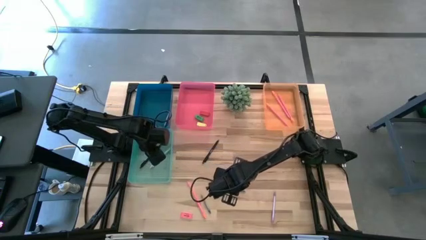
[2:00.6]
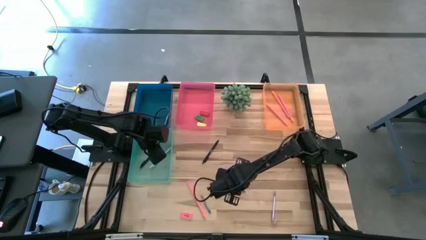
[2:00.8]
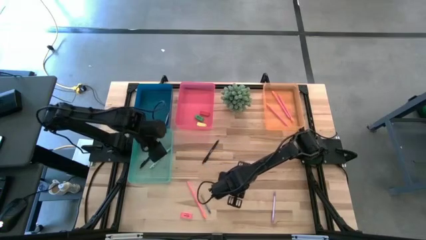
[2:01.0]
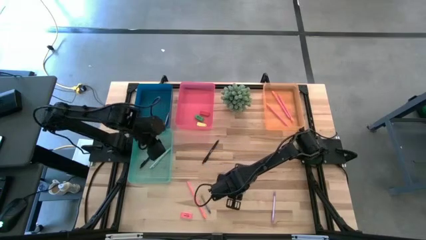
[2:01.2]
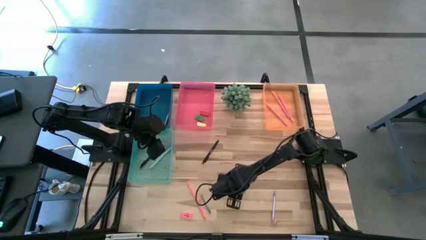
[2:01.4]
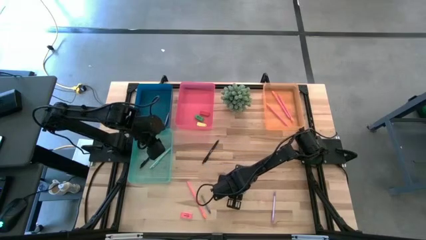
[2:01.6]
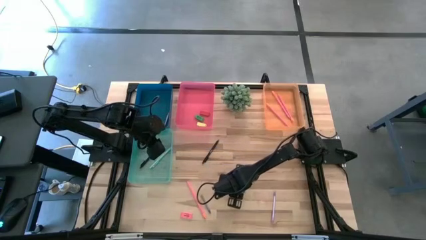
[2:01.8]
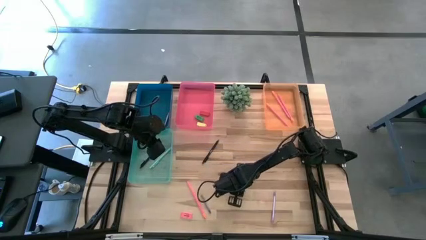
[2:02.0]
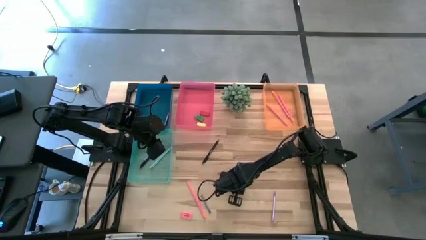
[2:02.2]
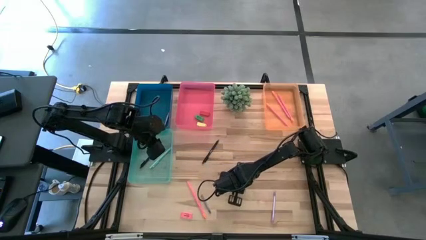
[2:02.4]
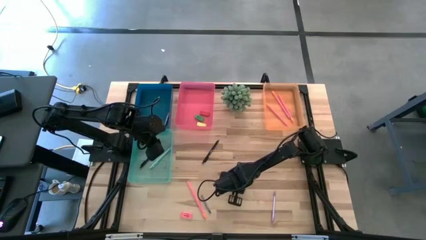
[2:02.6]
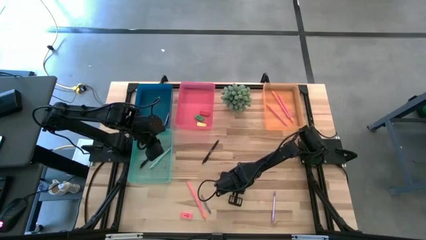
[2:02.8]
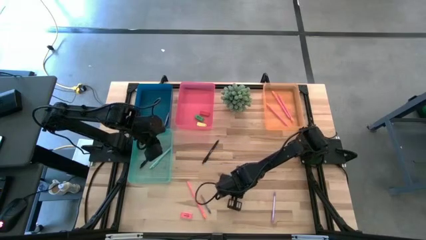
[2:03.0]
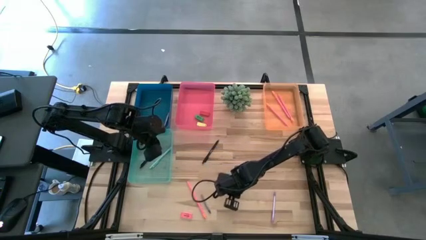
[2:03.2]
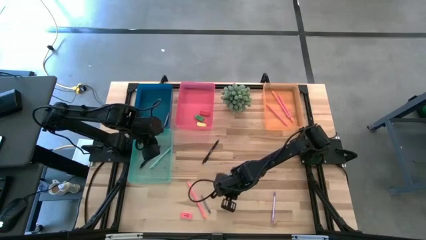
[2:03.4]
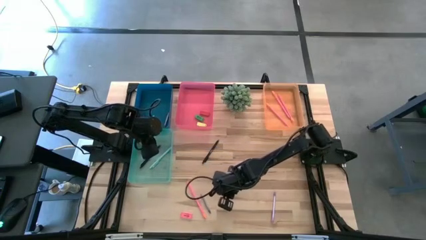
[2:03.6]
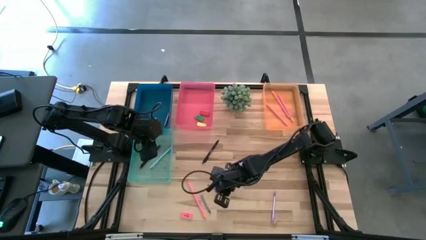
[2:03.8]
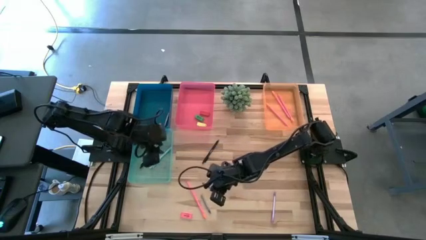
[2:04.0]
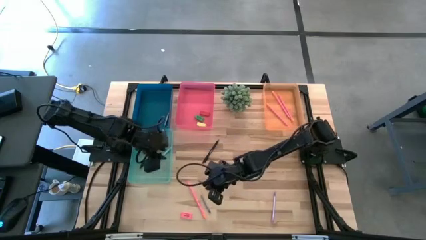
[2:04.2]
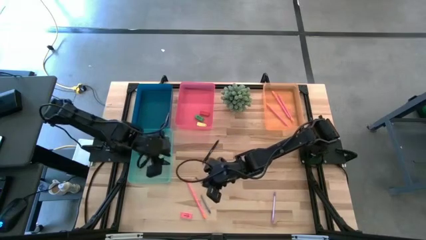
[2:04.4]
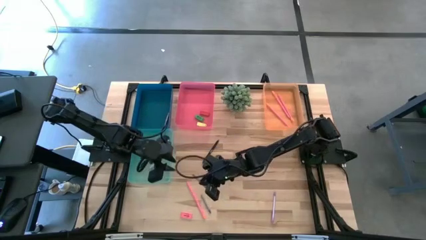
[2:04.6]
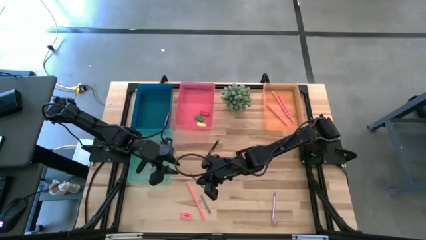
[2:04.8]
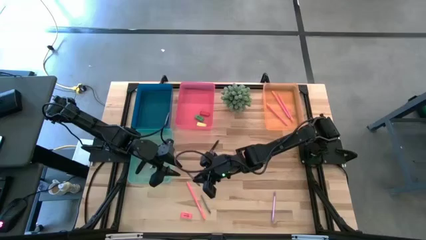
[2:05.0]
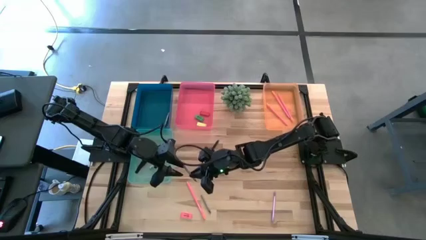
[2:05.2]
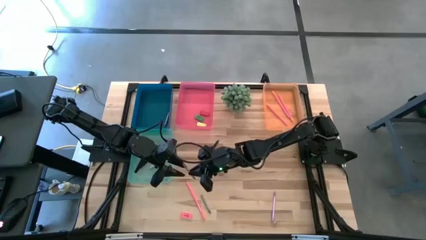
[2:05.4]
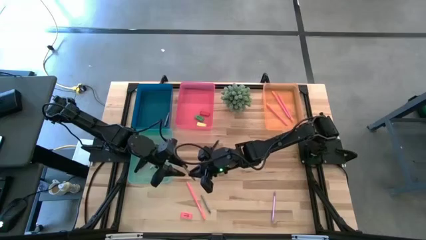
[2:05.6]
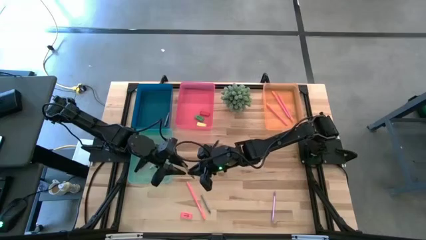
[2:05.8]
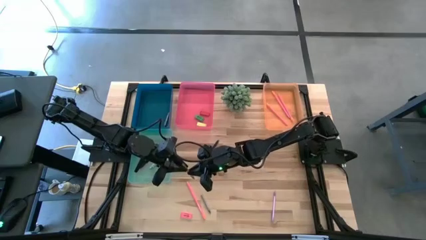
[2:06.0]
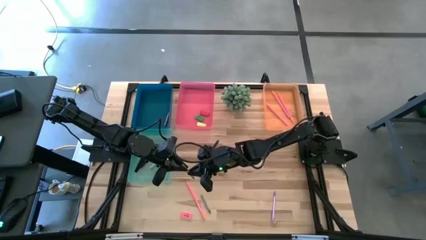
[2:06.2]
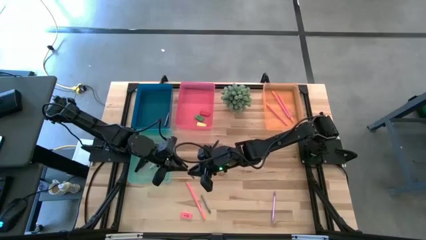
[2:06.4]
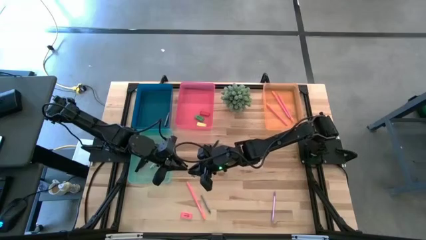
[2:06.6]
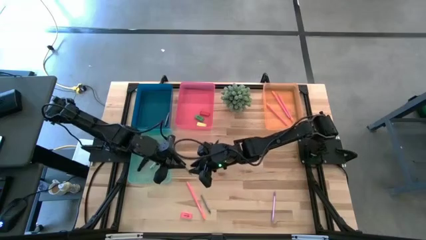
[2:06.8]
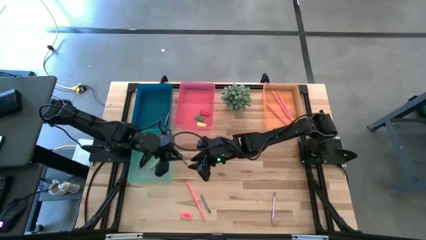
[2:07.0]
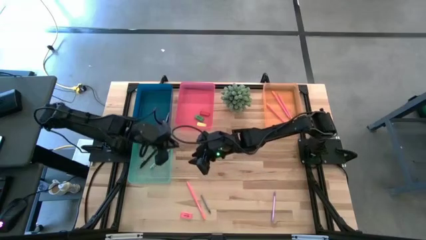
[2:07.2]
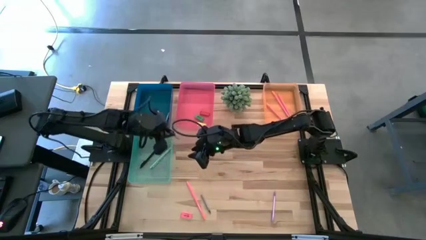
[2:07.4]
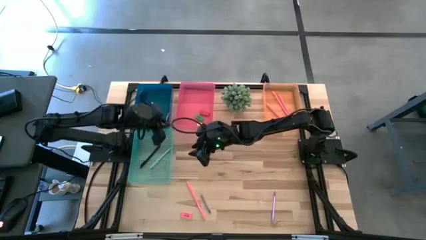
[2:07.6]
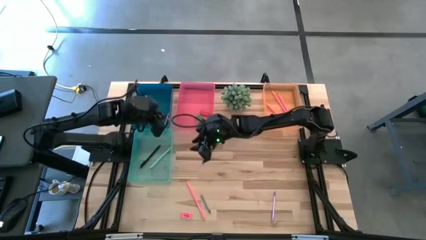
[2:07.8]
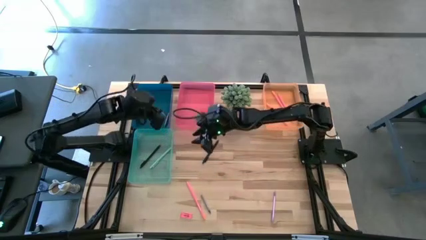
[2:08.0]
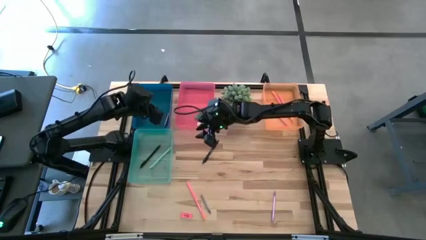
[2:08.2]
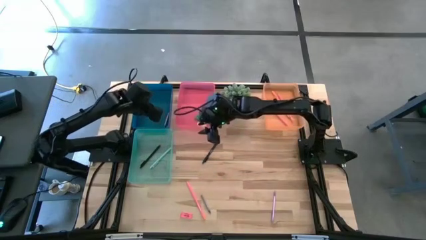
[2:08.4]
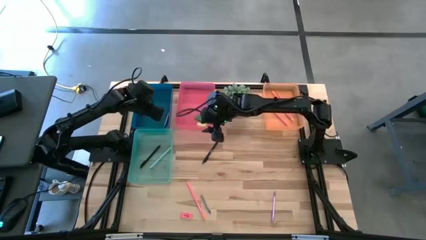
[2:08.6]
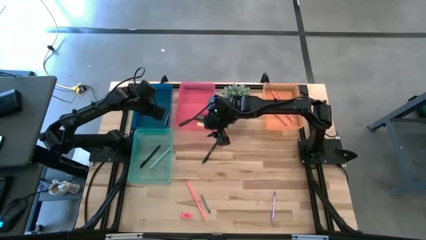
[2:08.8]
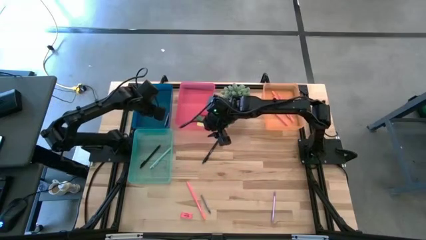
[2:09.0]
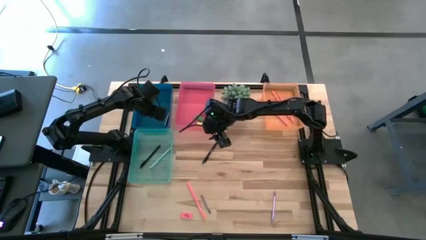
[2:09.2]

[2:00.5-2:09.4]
Task: Sort crayons/erasers/pens/pencils in bins
Put the gray crayon into the blue bin

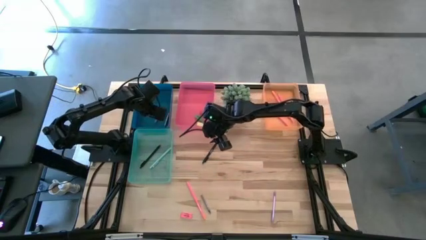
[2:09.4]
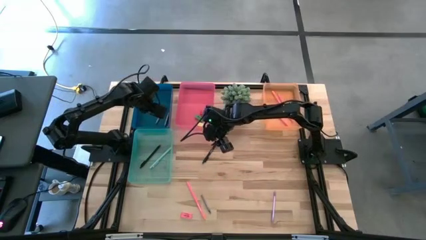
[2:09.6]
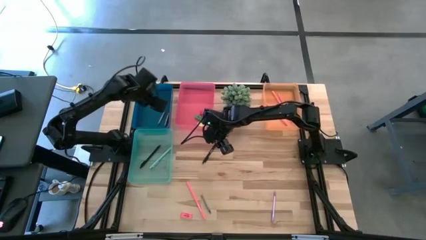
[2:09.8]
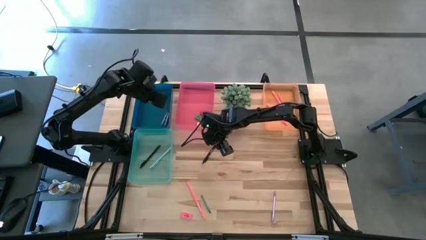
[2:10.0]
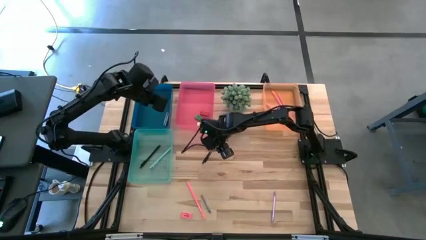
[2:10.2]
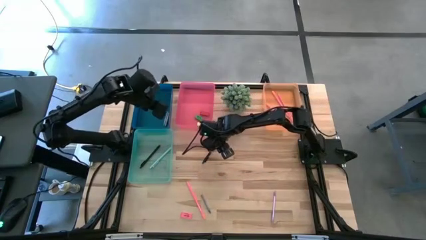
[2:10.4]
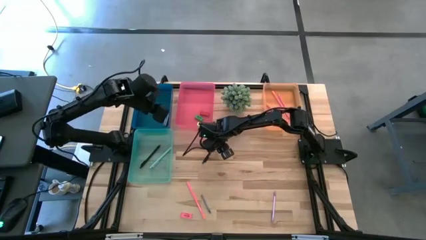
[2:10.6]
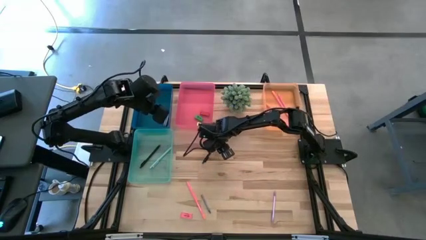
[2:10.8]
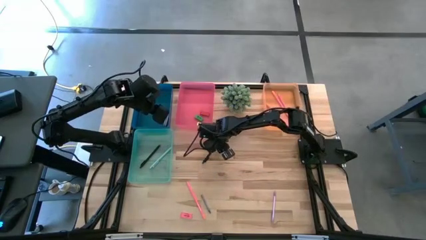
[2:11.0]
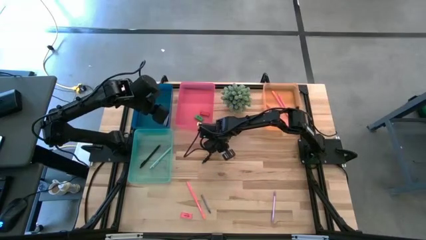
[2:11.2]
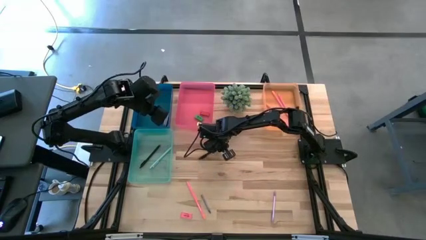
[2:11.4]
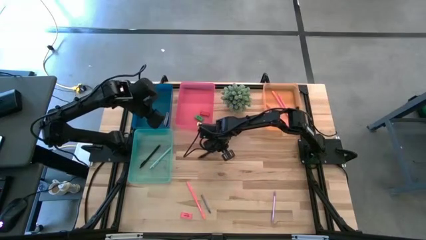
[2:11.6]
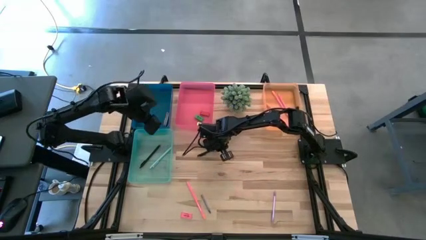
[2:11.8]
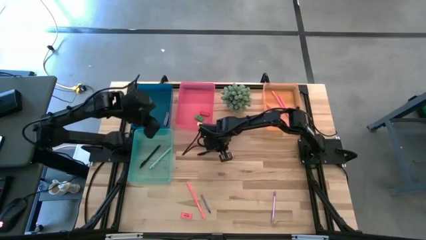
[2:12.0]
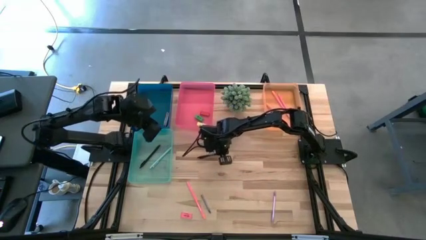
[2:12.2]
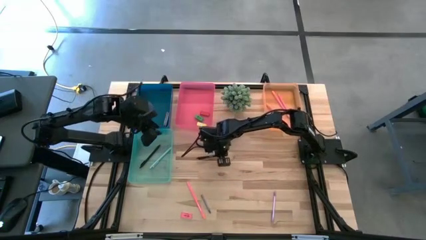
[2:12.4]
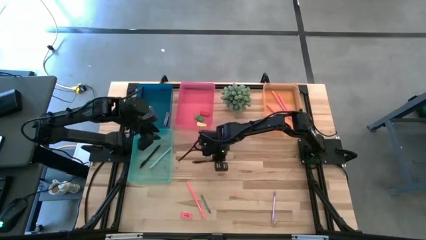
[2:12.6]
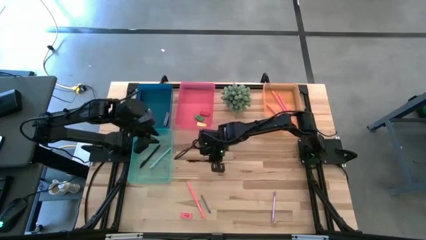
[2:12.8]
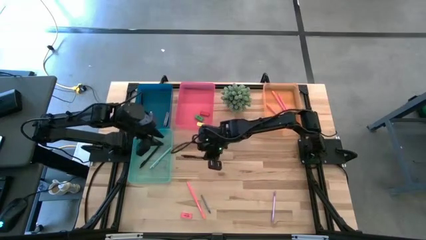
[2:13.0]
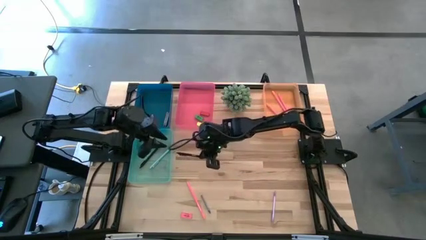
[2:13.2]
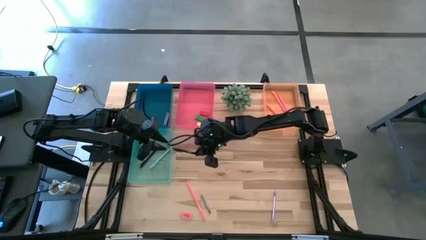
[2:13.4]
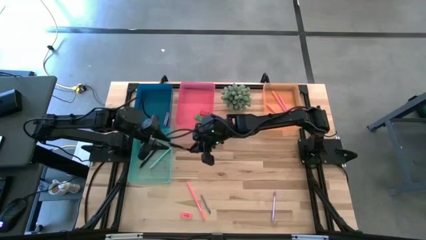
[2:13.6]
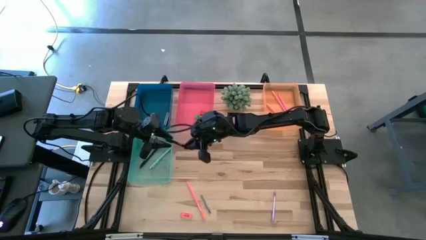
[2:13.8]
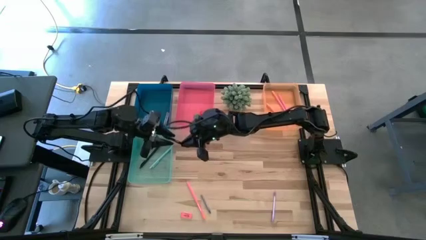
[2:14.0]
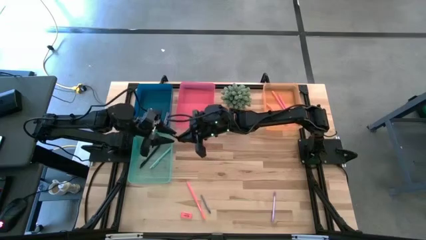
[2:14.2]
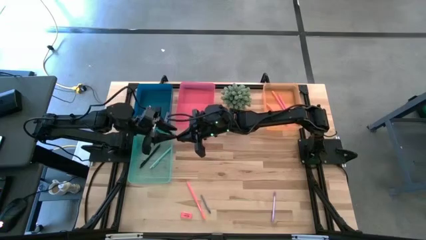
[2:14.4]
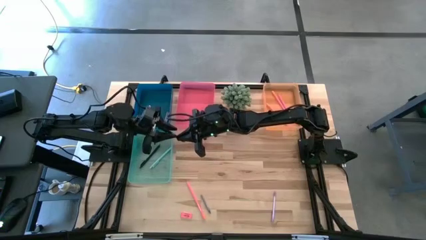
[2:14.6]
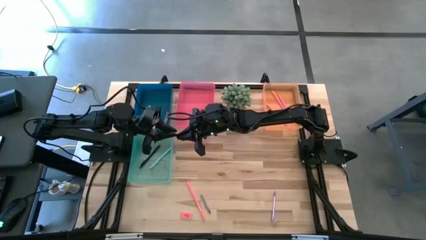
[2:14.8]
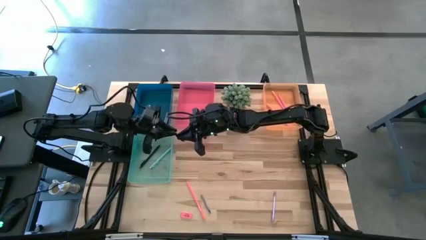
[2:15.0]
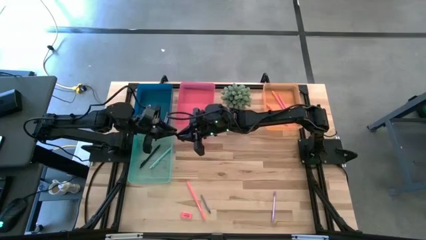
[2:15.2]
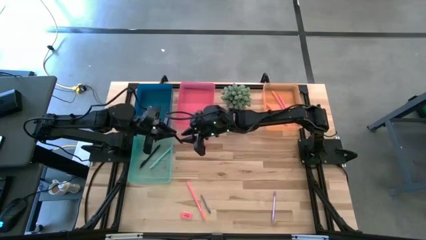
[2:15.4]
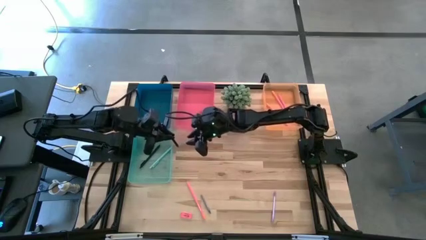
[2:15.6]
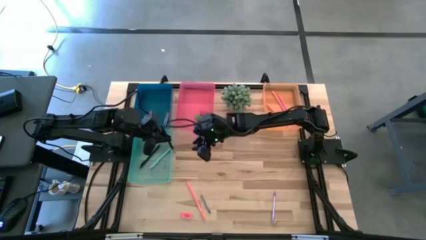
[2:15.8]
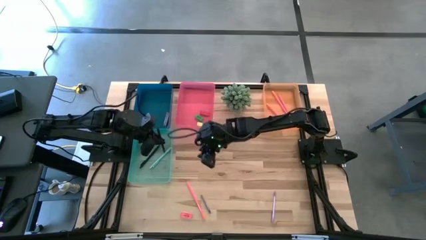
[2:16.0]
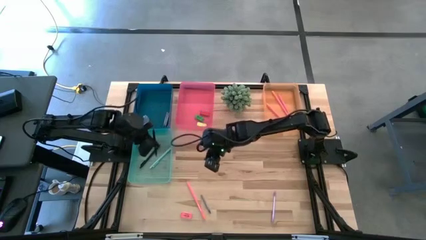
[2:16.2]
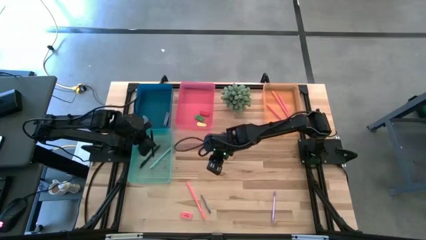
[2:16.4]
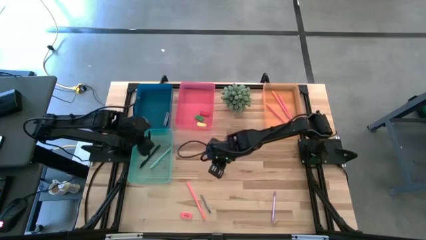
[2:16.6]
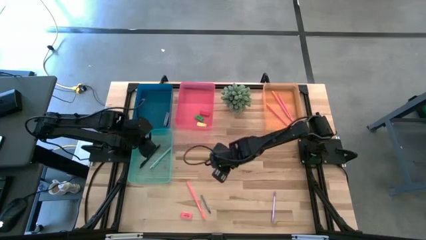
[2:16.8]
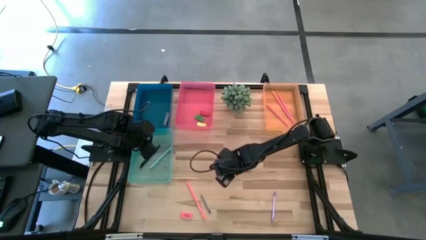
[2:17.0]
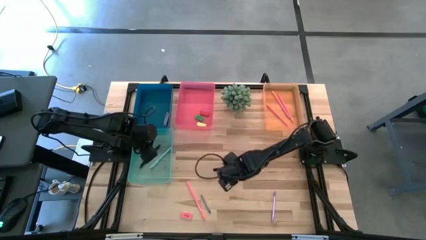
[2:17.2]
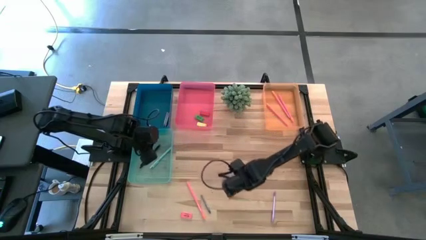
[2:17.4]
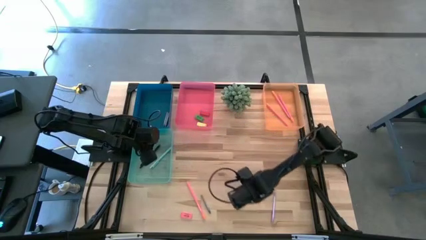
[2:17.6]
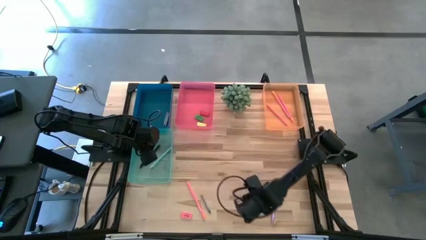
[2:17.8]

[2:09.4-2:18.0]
Put the black pen into the light blue bin
